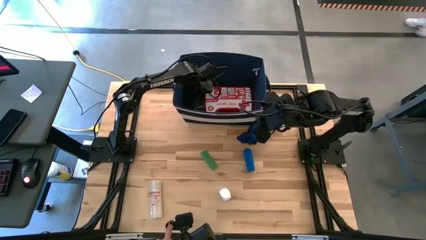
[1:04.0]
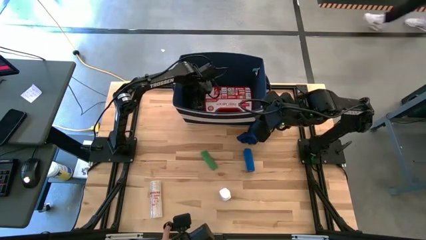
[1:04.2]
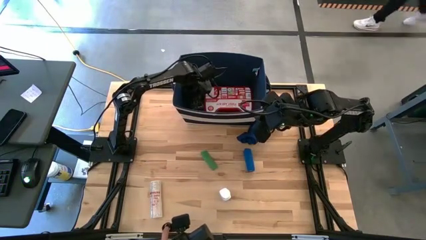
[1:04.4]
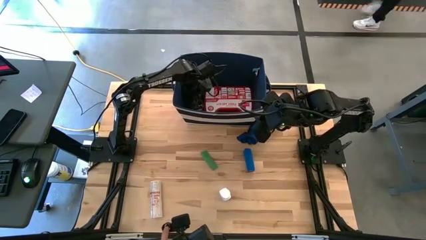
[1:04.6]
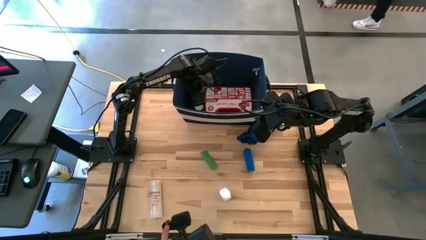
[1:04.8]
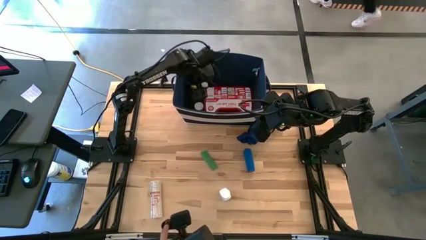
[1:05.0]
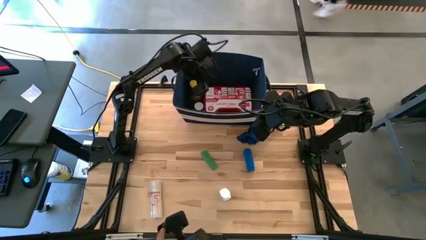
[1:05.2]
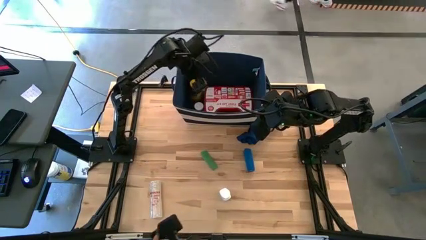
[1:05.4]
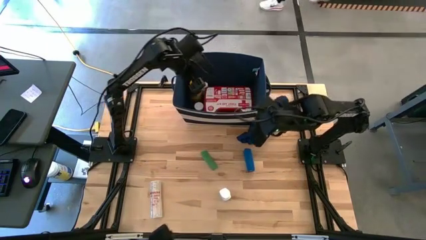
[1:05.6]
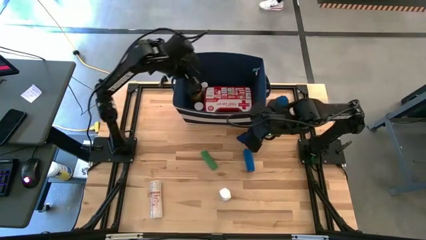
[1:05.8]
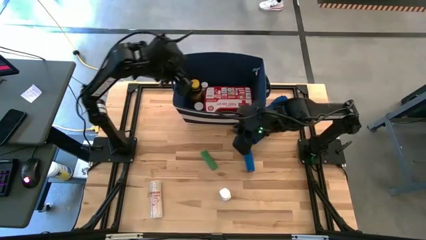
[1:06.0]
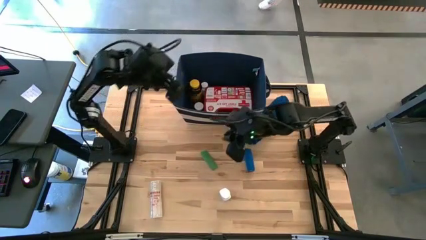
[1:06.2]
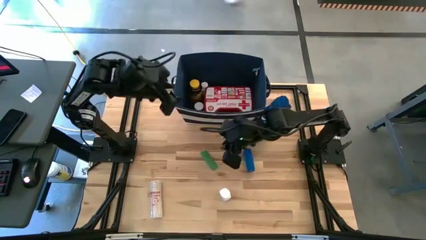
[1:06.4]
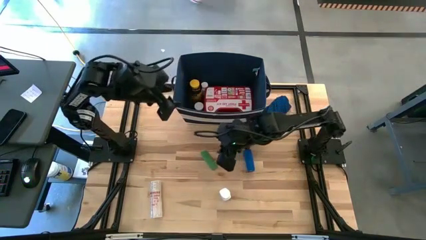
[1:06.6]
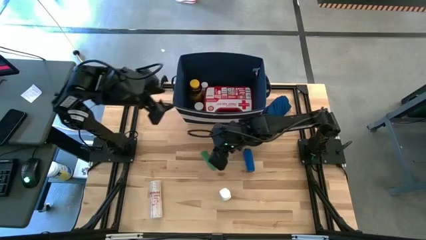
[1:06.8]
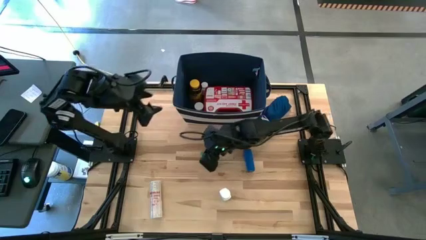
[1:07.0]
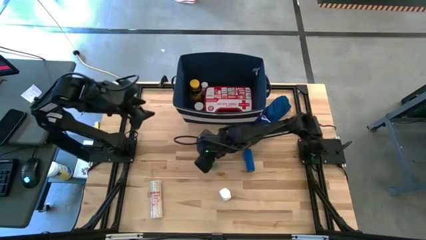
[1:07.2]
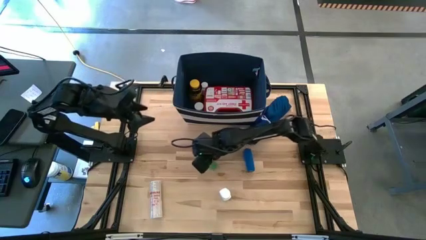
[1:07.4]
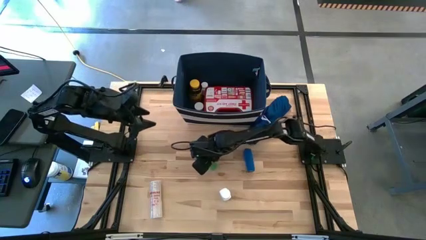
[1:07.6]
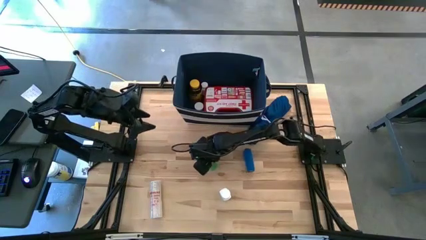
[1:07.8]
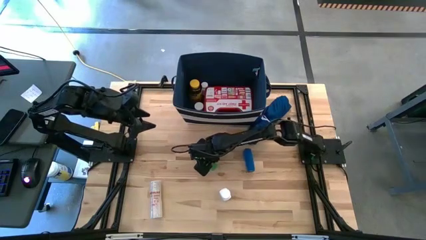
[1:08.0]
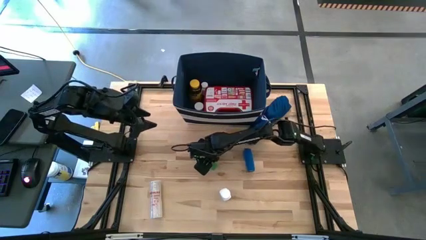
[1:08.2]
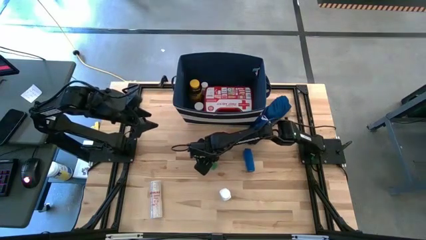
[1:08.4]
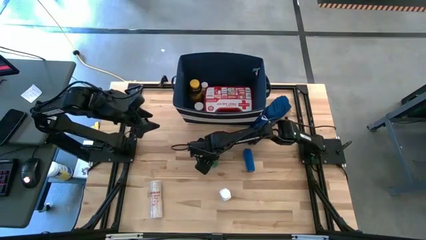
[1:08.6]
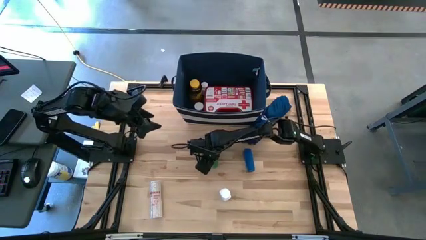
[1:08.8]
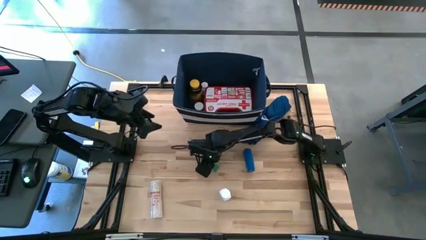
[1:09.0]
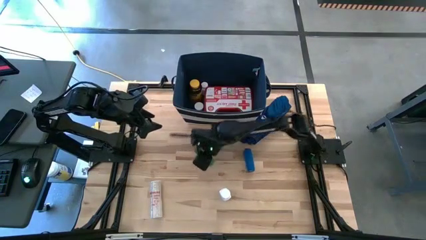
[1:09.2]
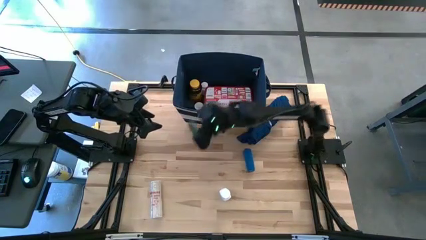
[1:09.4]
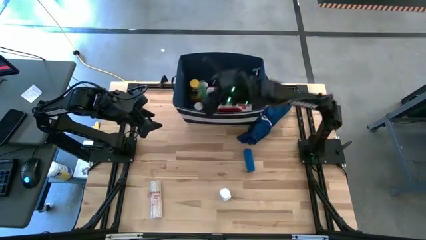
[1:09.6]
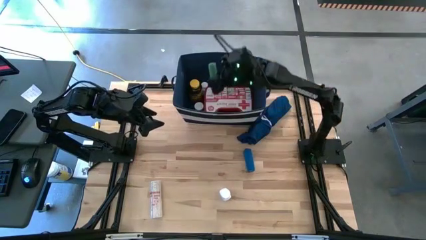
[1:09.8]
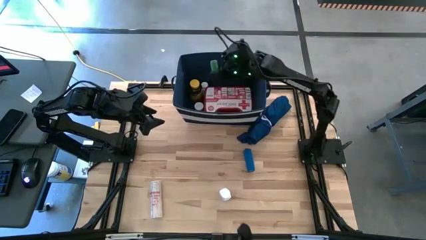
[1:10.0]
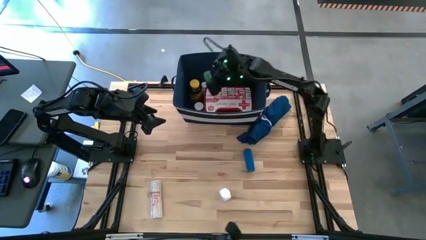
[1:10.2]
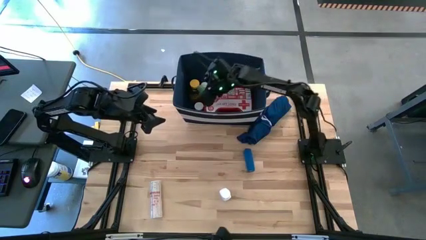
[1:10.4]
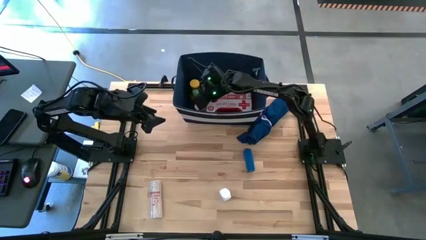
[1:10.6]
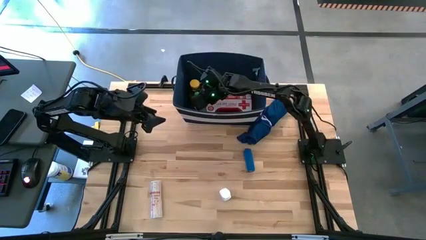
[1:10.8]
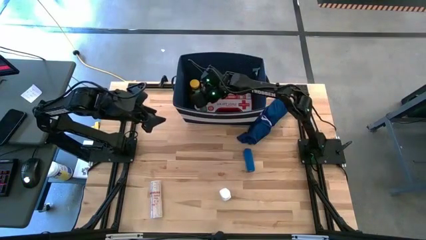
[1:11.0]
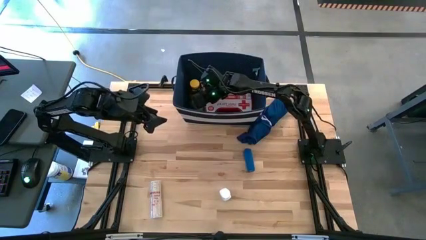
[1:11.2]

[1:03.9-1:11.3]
Task: Pick & place medical supplies in basket/bin
Put the rolled green bandage into the blue bin

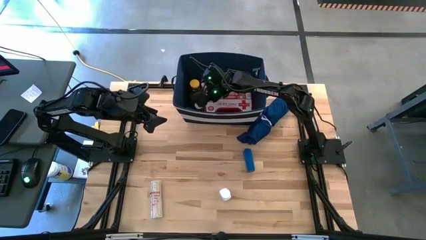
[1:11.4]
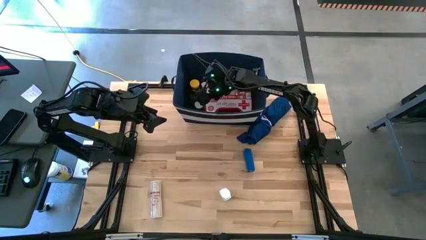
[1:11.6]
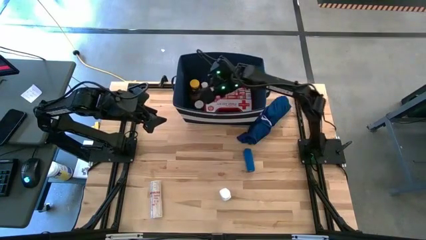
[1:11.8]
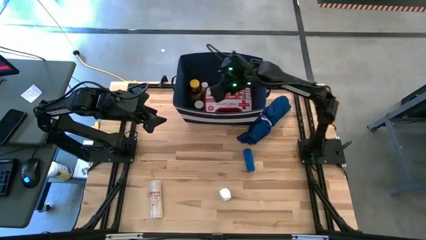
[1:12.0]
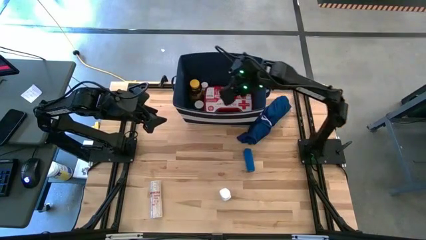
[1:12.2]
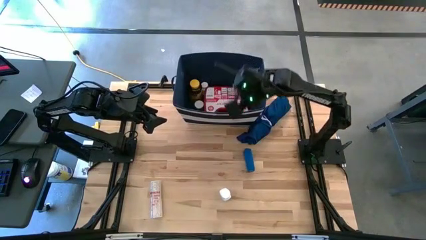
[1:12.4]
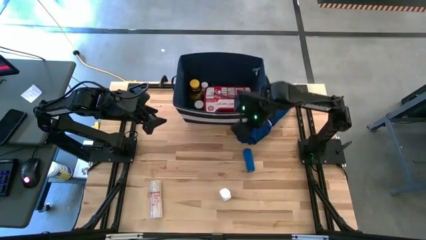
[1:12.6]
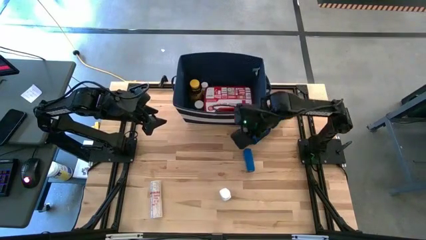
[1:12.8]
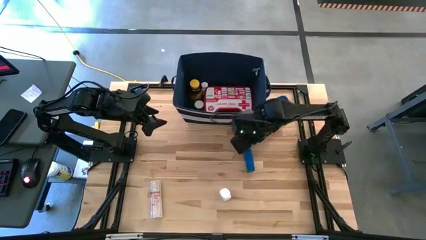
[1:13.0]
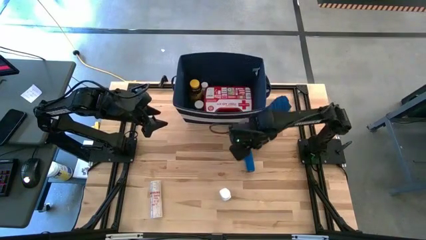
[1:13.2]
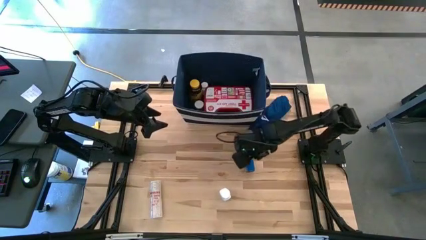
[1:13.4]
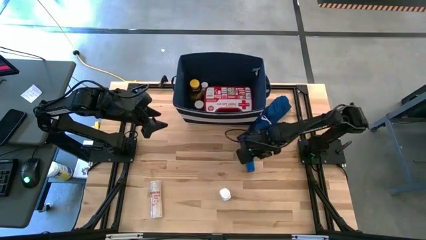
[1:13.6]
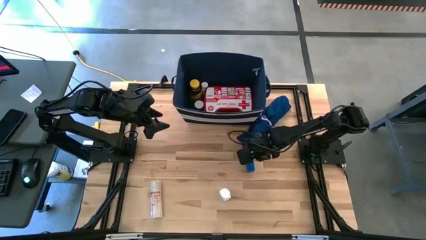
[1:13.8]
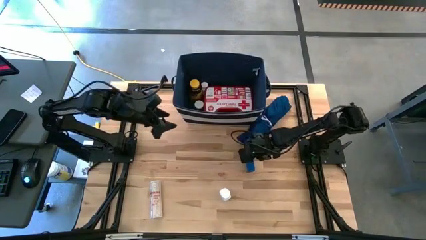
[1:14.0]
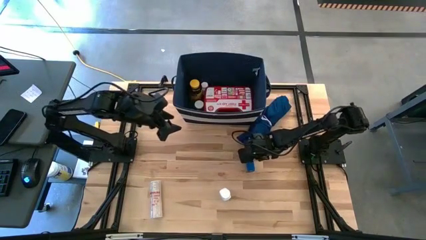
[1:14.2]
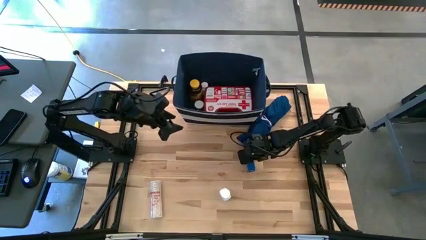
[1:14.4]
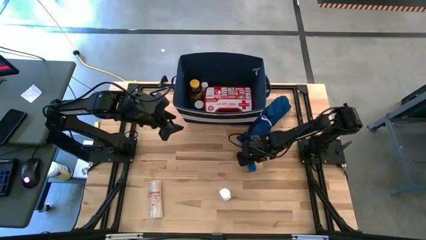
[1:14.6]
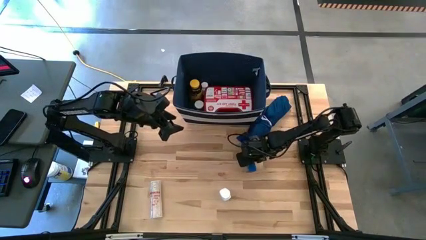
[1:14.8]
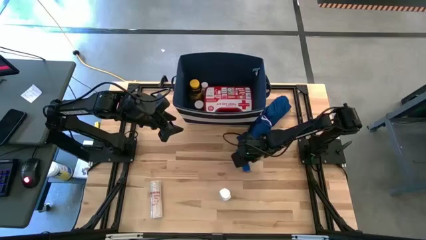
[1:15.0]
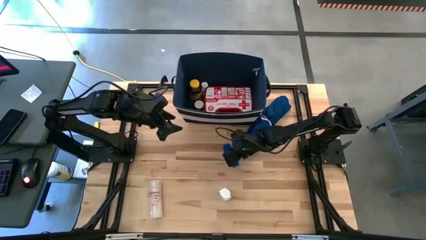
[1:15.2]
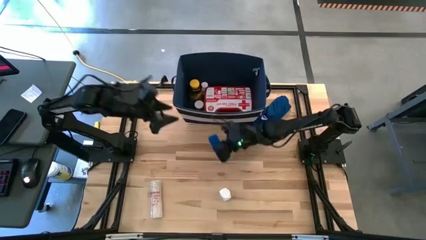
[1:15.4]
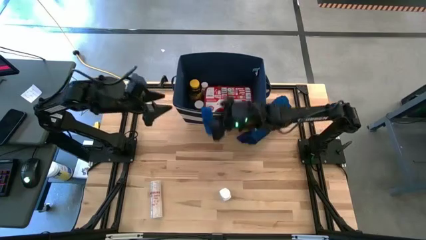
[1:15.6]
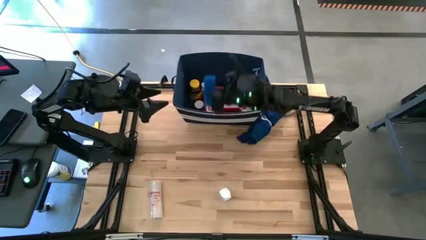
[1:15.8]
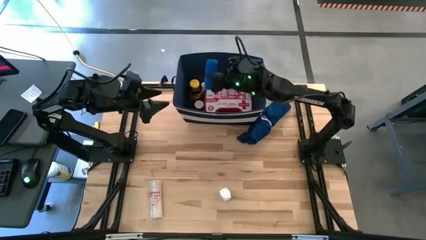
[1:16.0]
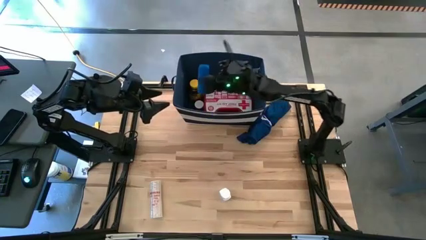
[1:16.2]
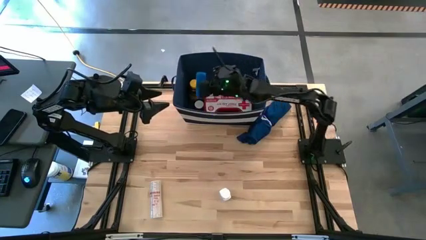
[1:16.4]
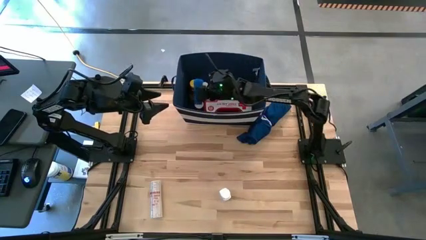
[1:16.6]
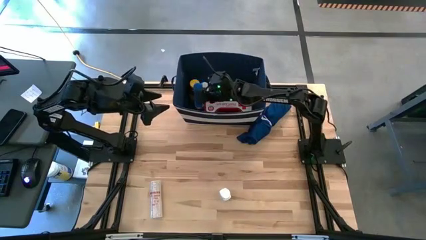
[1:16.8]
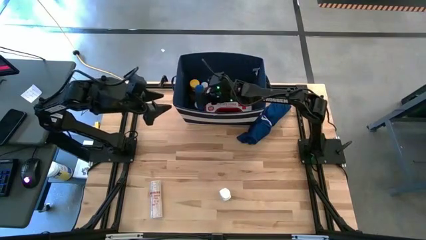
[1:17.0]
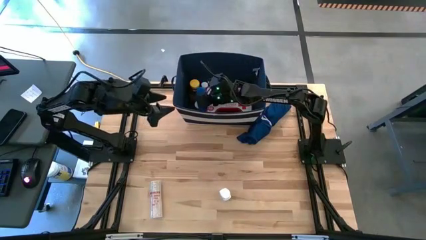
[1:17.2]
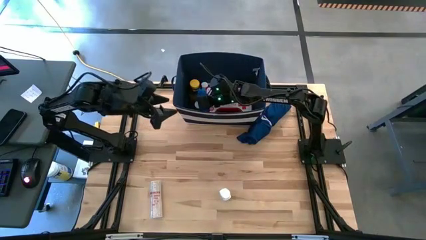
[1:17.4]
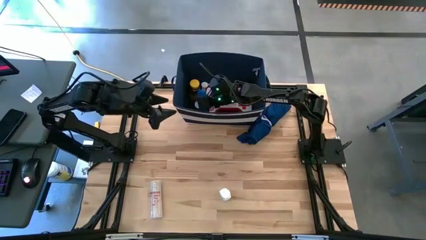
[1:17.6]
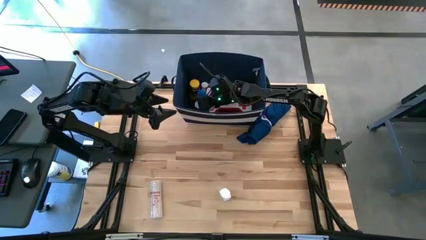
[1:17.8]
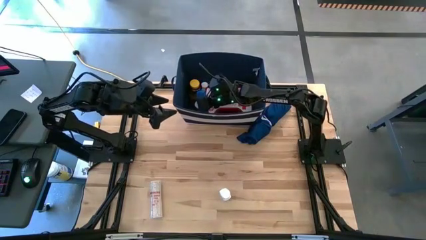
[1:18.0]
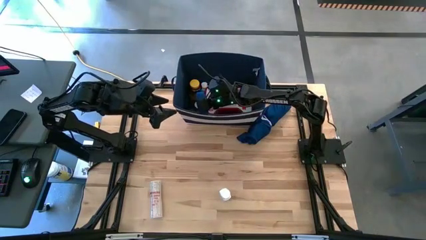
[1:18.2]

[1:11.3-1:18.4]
Put the rolled blue bandage into the blue bin

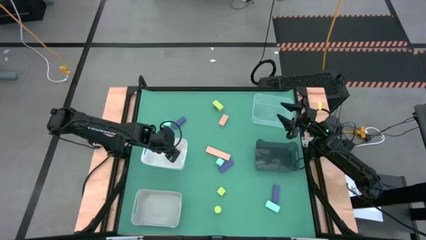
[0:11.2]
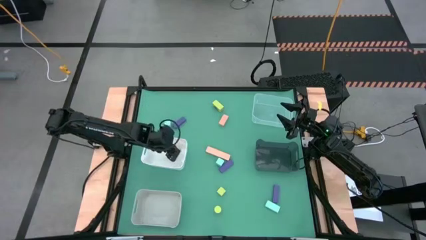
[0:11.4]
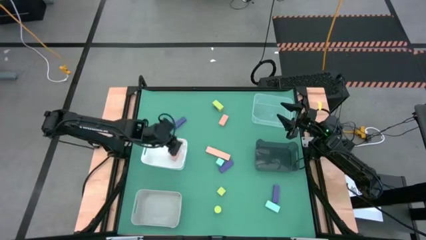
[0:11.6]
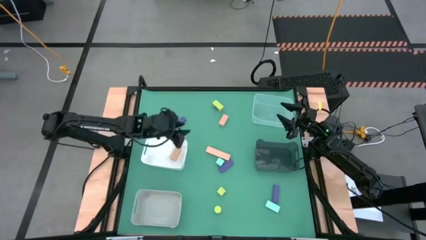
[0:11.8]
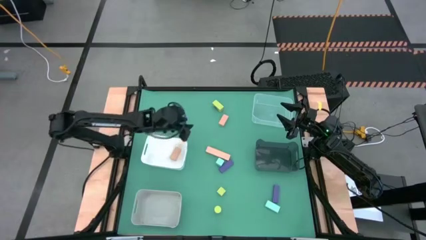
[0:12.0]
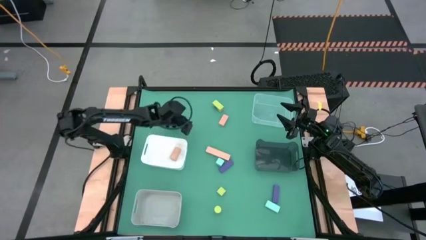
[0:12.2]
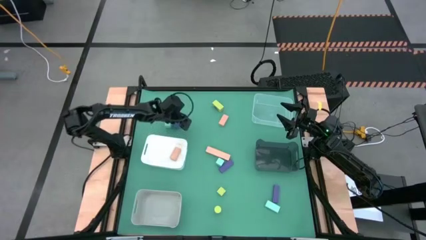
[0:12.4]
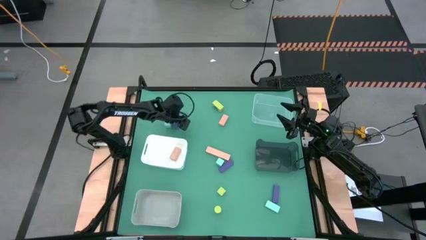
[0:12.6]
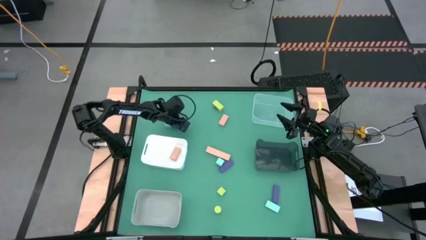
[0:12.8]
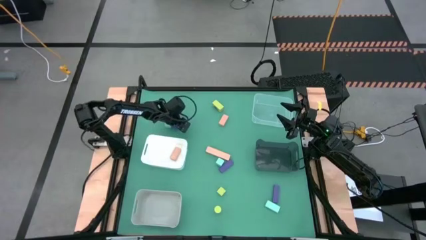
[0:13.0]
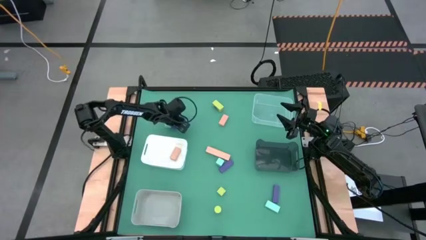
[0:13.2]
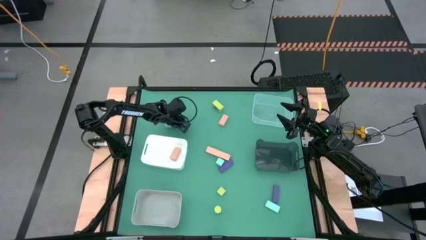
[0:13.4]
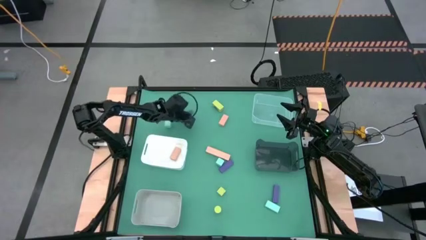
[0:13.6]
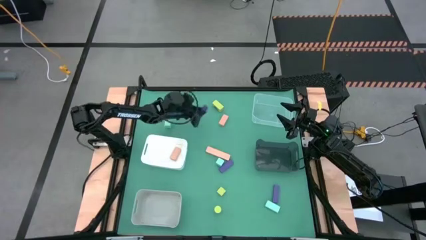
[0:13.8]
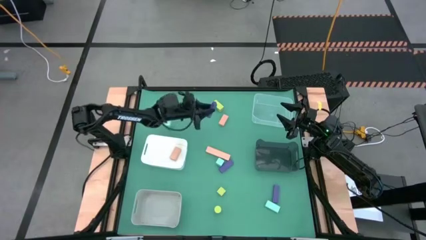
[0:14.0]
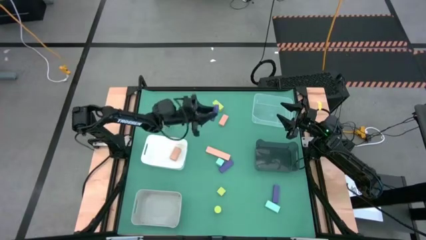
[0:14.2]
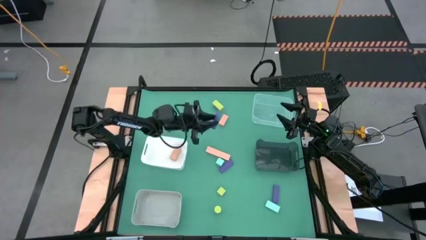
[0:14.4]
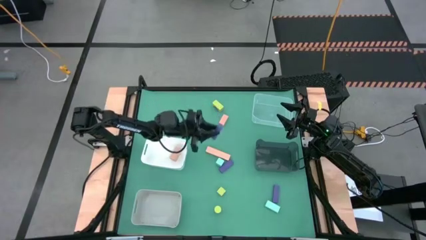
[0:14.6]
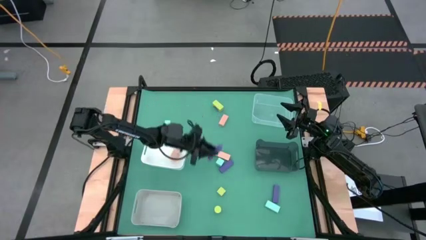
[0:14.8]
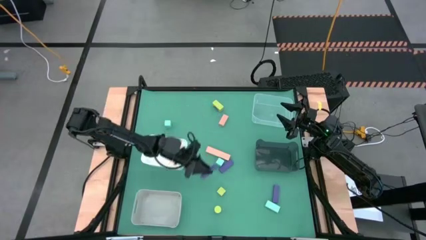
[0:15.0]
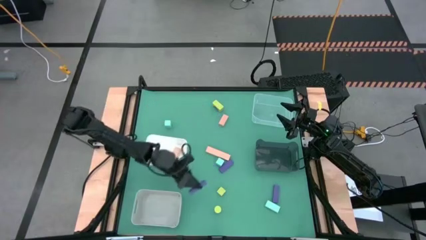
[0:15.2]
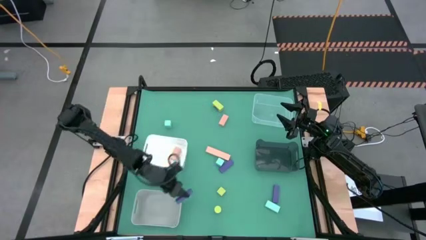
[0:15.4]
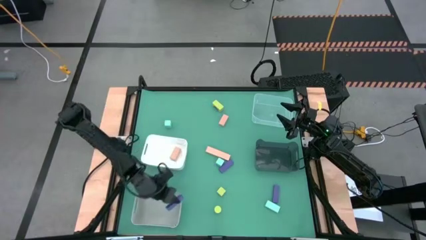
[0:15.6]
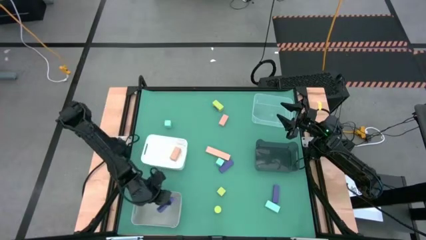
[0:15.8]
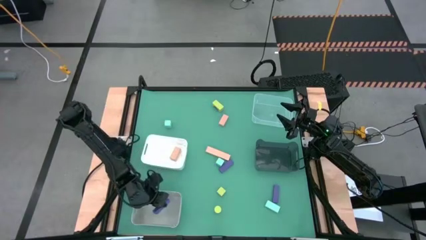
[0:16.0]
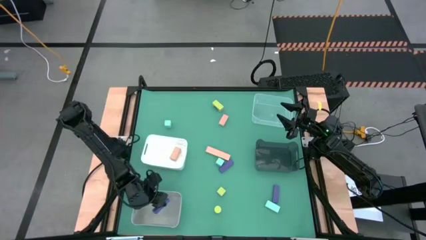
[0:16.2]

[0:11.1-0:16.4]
Task: Sort & place blocks by color
Put the top violet block into the gray bin
